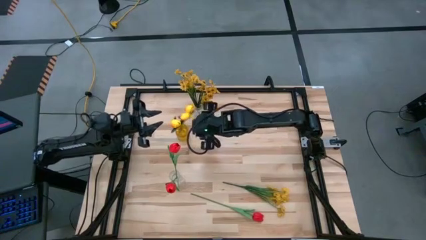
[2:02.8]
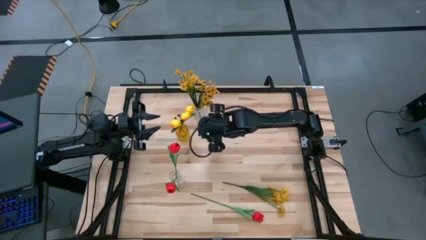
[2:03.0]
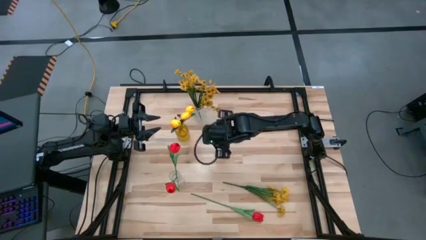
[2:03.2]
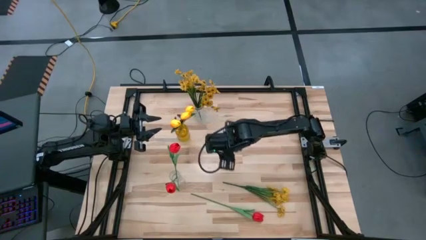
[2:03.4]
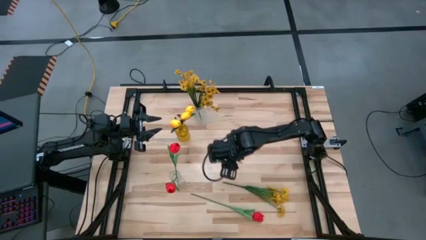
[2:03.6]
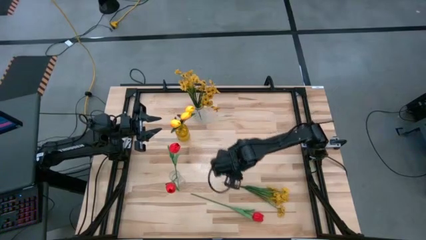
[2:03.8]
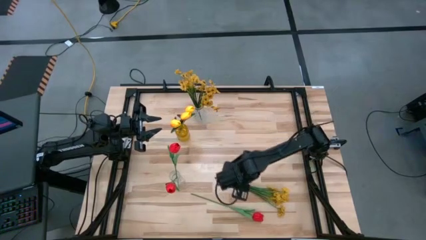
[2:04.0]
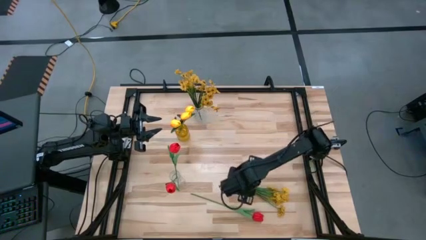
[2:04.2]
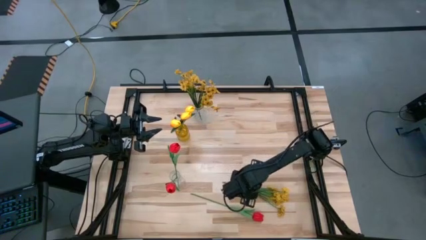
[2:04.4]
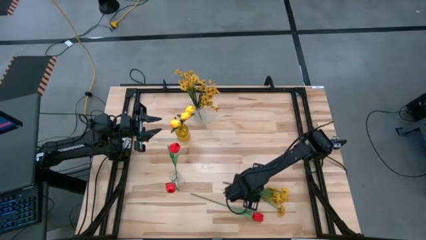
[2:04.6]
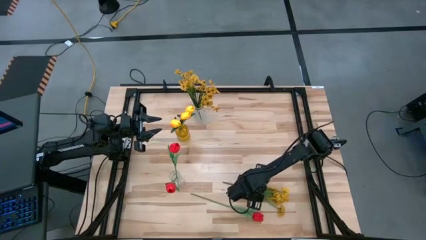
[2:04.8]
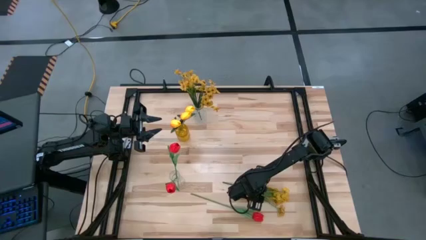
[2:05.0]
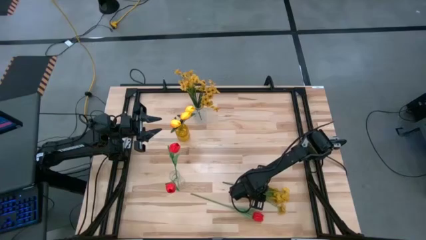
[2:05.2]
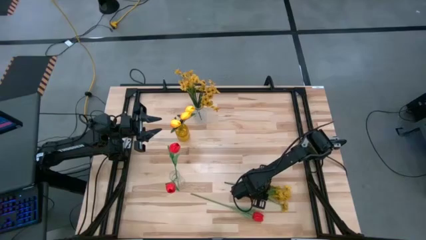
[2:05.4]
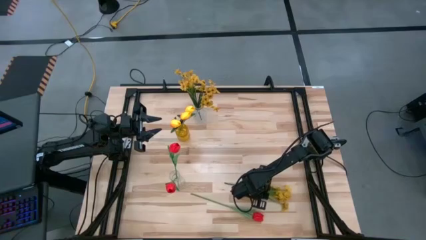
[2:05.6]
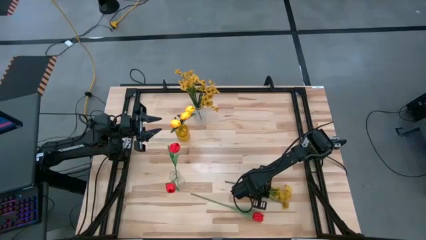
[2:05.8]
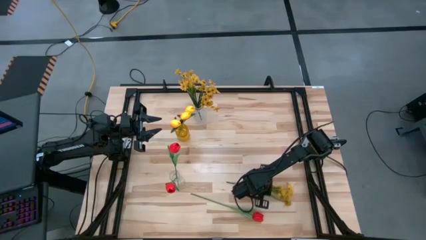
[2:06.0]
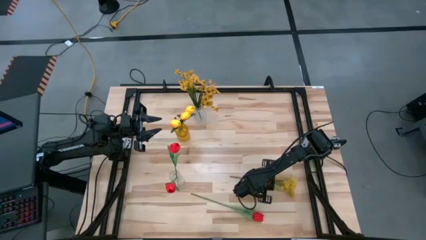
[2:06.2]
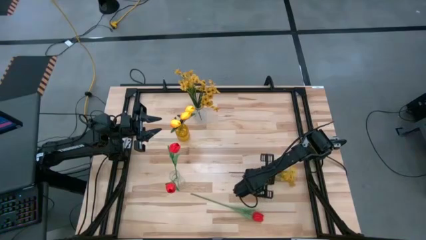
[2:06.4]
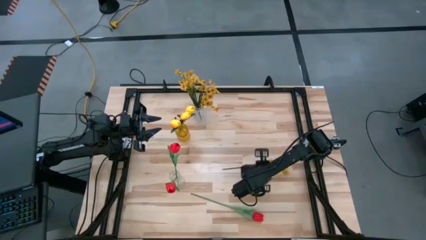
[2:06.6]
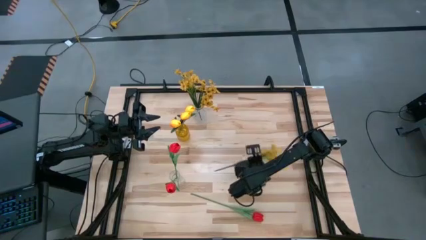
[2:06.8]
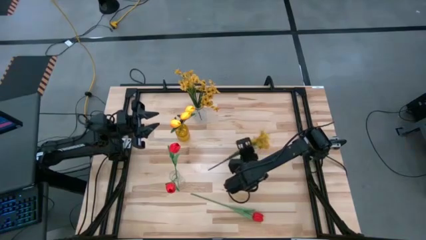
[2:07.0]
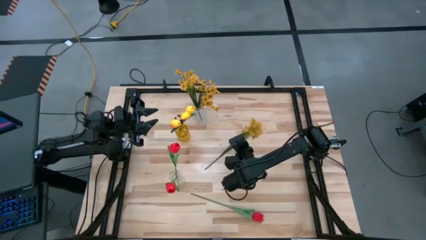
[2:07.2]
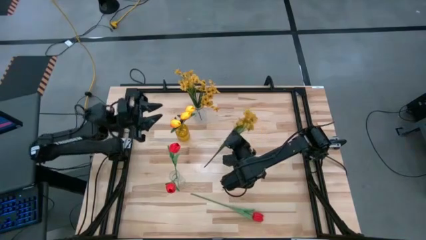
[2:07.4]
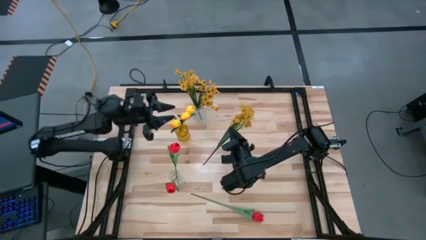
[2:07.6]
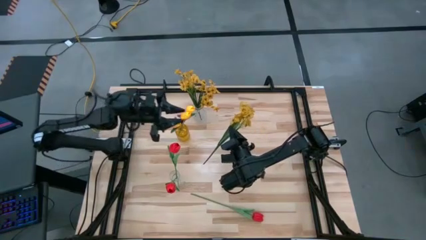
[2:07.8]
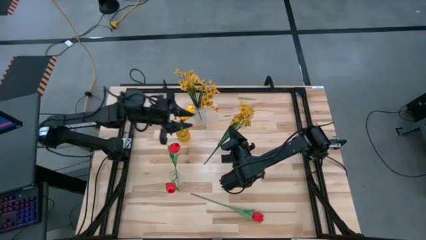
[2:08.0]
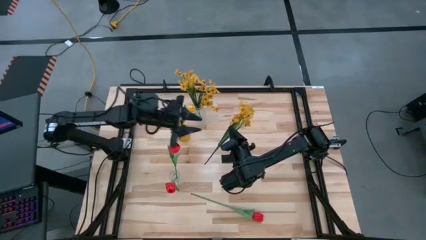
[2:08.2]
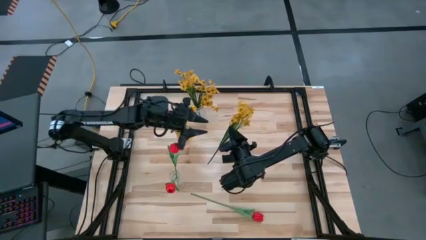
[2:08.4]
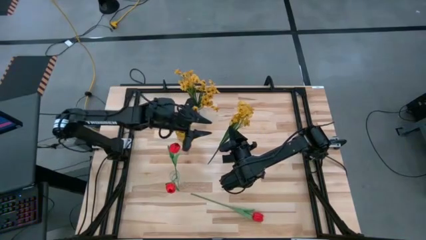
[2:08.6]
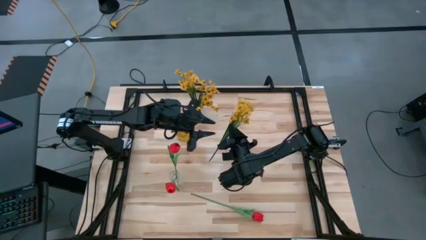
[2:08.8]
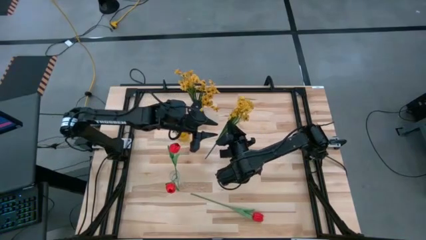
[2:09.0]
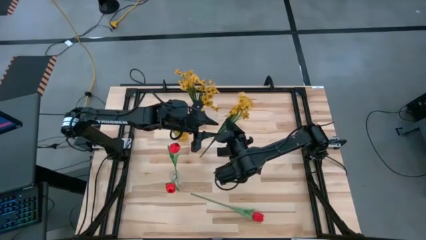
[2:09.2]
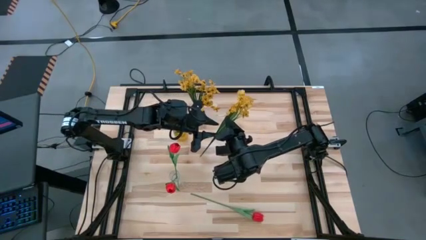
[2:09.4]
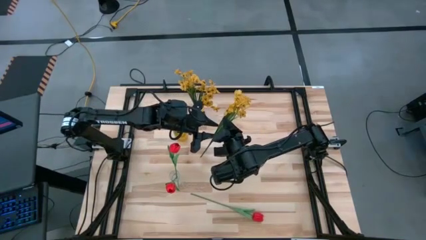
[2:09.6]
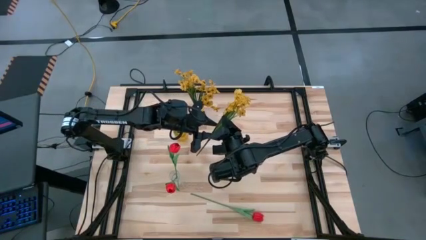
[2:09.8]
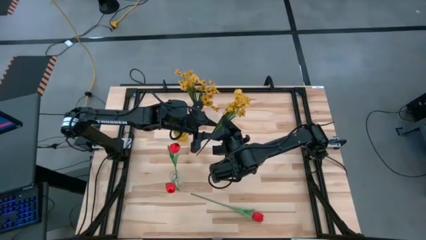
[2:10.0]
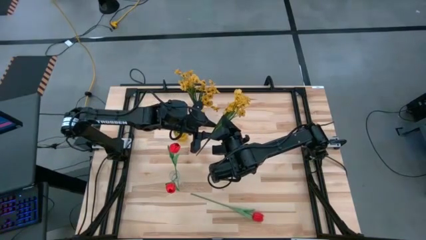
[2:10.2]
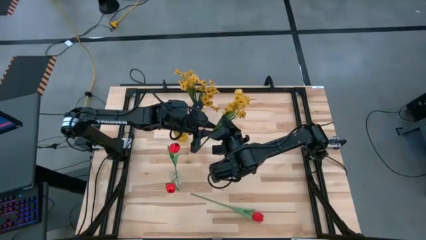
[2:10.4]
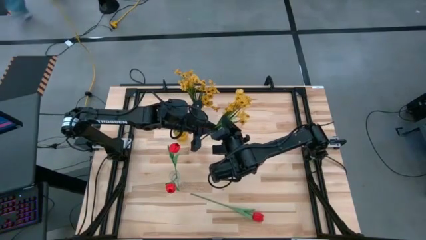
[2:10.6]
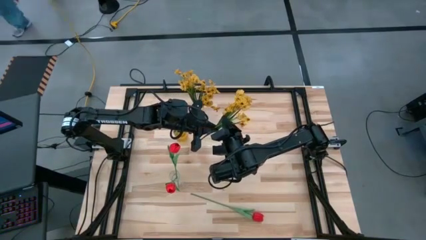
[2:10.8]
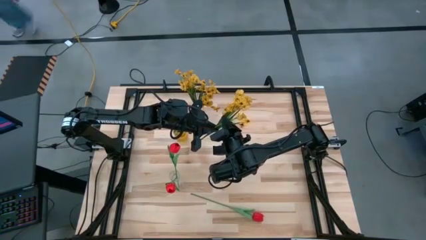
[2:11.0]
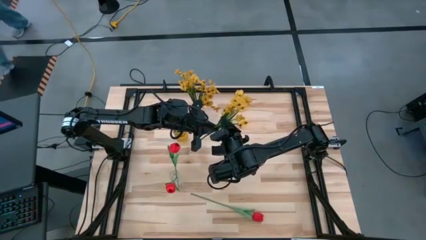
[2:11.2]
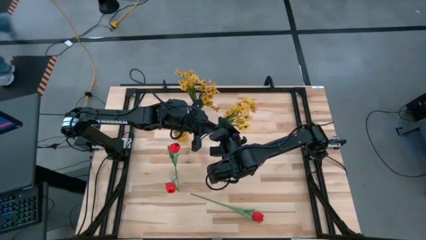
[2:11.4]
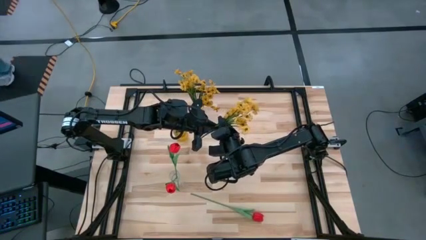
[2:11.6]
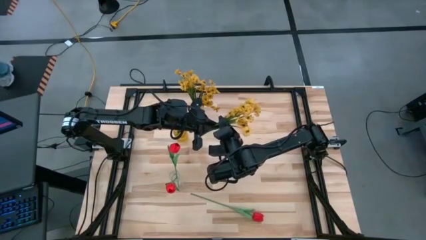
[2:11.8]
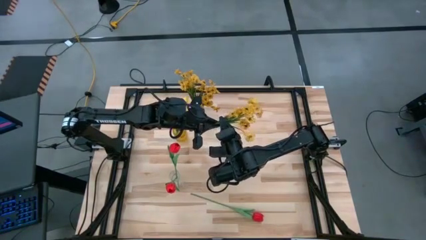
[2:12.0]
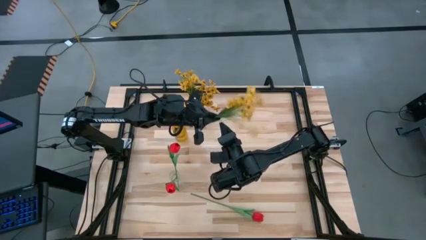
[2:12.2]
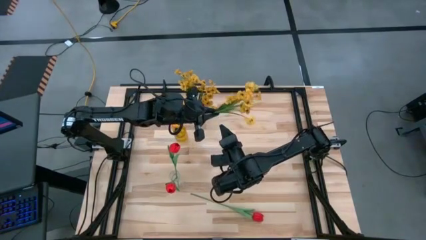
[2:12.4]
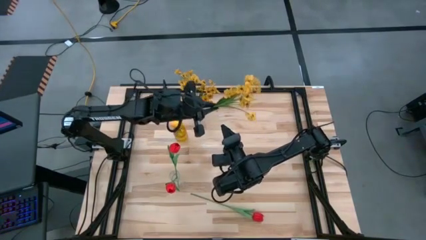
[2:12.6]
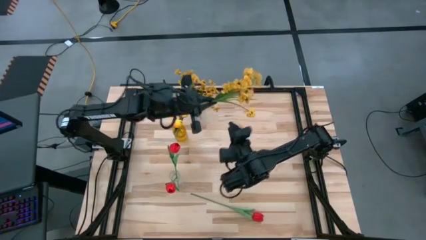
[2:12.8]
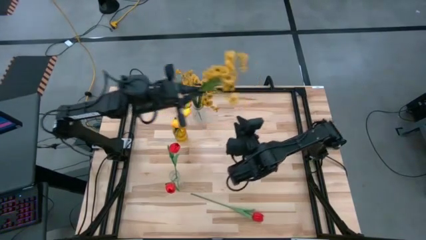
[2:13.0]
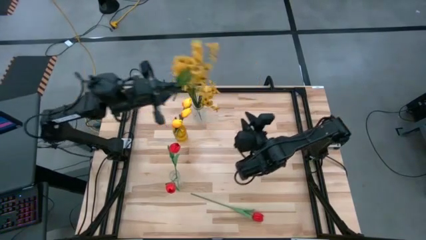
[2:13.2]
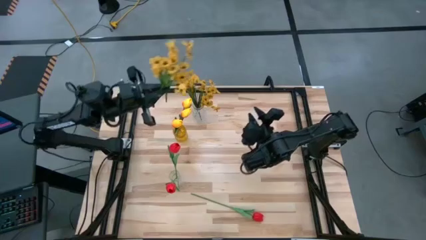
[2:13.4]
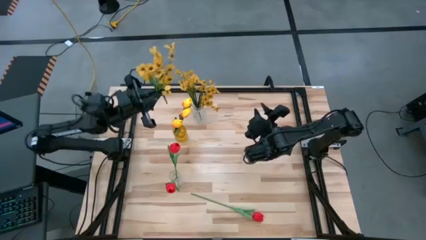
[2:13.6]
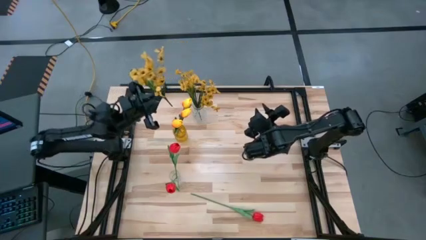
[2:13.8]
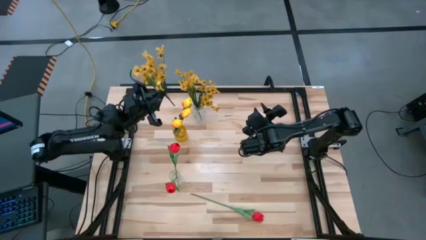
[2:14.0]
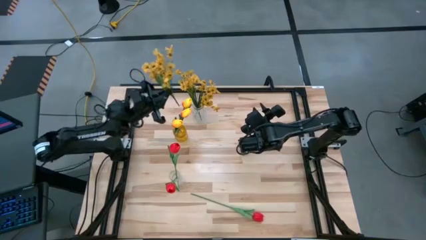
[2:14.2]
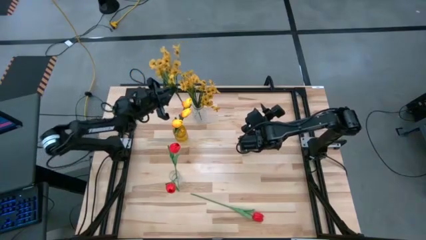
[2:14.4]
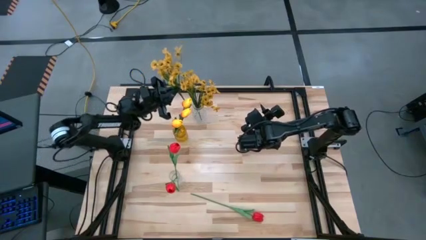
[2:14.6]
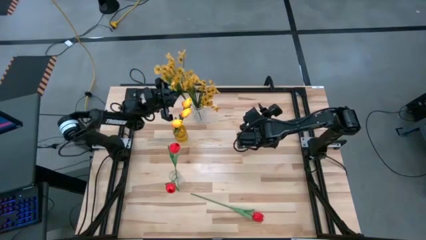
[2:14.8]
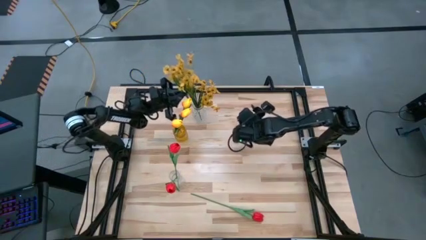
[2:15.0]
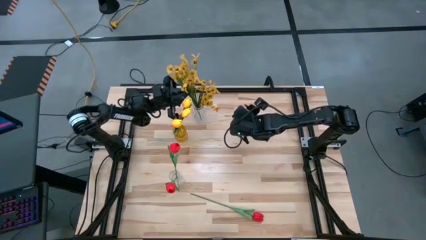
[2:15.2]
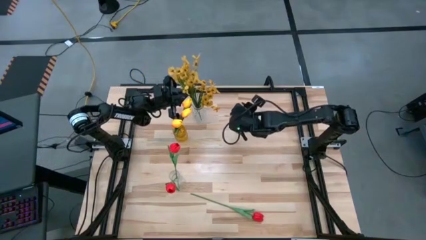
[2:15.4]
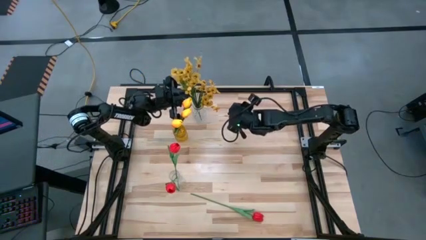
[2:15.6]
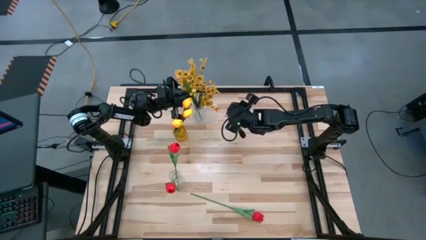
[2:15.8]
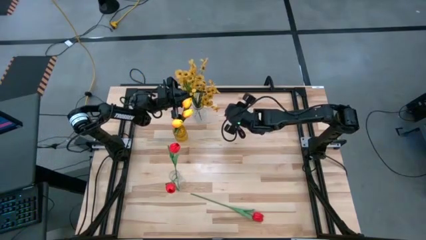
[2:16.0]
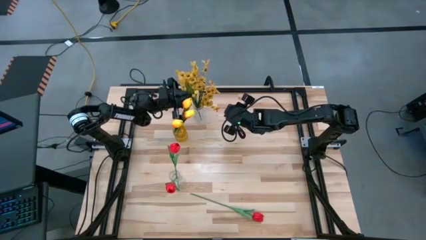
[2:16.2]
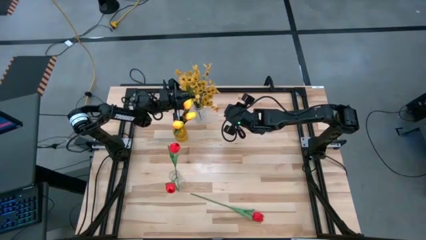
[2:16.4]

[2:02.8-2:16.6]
Task: Sort flowers into vase by color
Put the yellow flowers into the top transparent vase

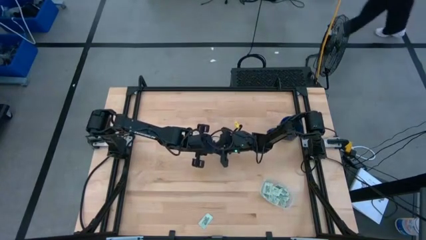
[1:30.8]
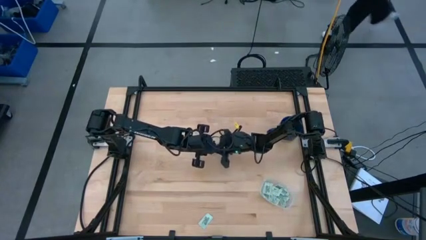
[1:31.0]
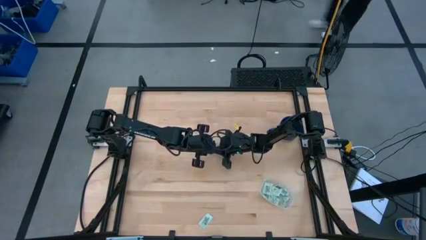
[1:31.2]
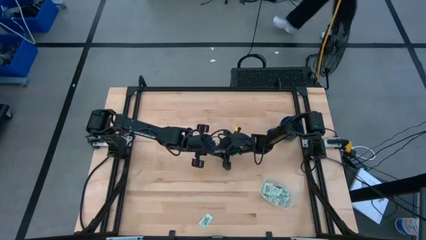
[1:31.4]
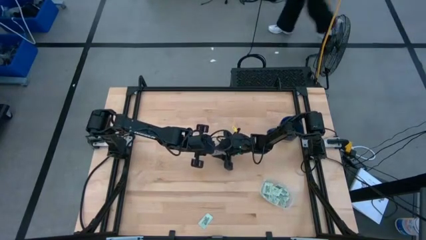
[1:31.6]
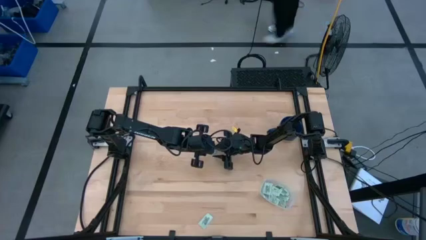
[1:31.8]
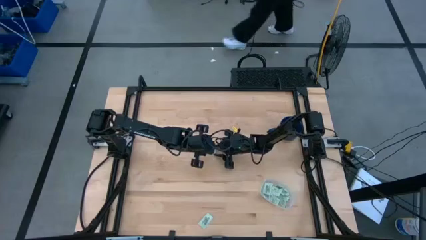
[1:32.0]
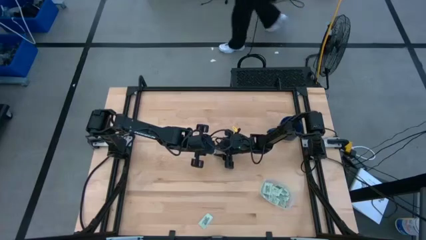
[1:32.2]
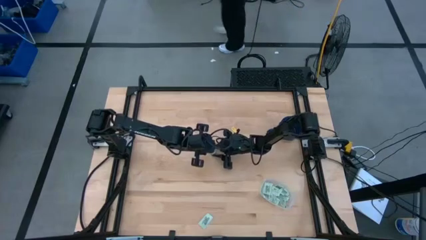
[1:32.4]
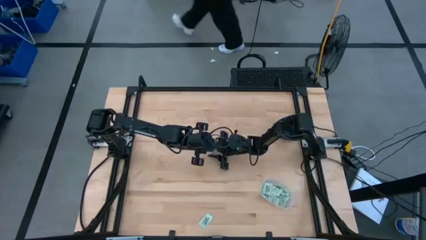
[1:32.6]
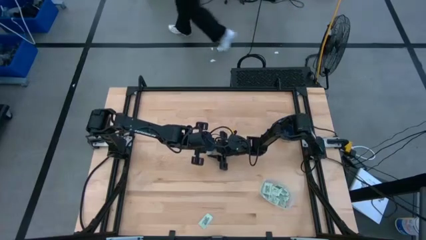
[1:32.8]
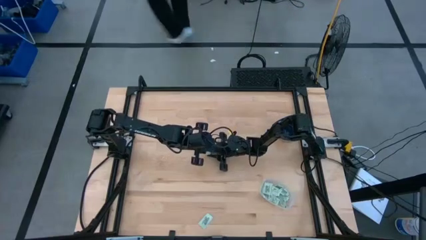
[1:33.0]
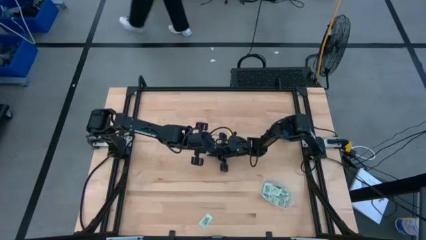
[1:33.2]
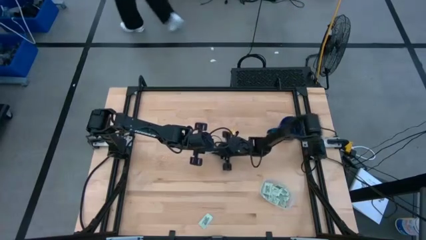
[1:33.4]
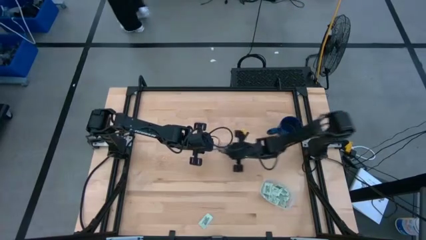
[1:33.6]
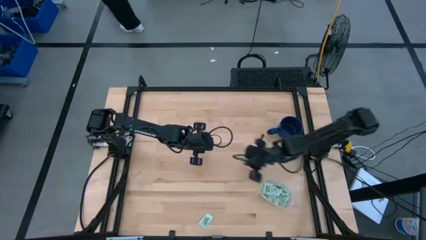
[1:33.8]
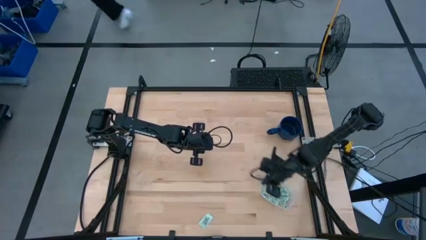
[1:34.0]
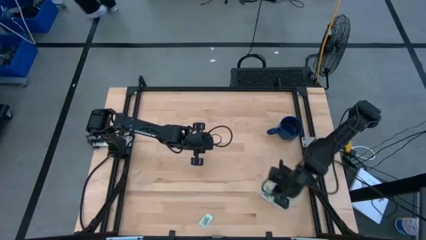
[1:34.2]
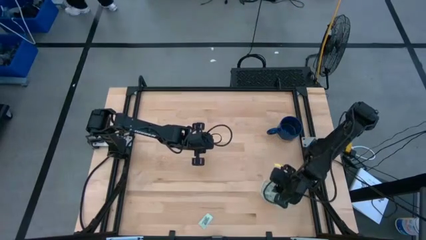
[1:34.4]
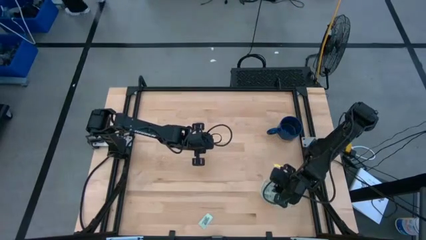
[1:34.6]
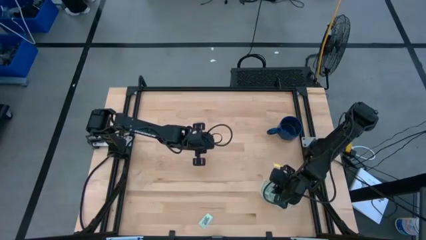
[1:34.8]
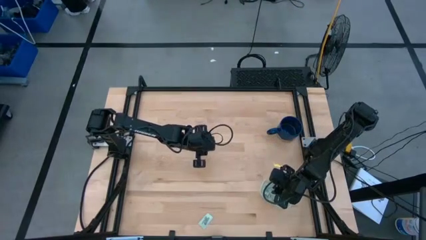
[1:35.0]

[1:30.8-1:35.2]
Task: Pick and place Stevia / Truvia into bins
Put the stevia packet into the transparent container
